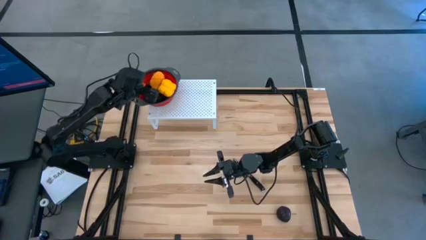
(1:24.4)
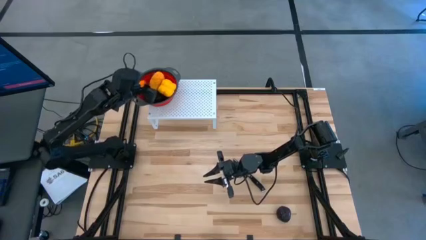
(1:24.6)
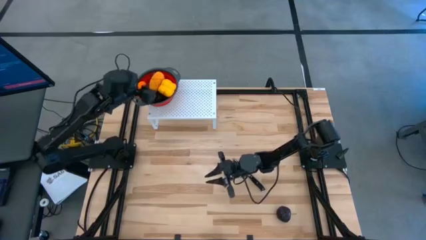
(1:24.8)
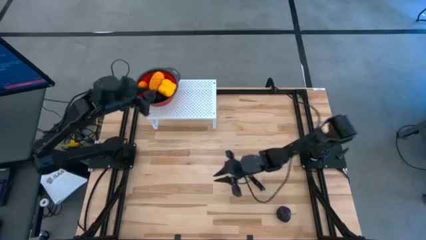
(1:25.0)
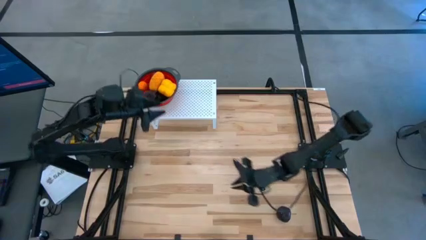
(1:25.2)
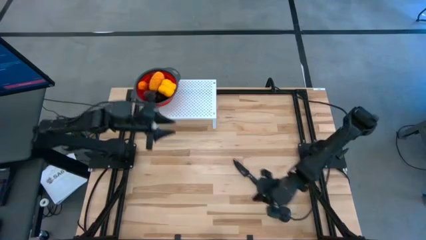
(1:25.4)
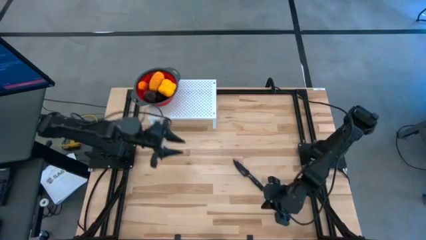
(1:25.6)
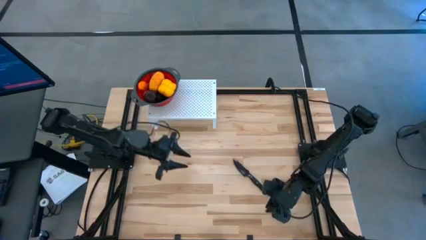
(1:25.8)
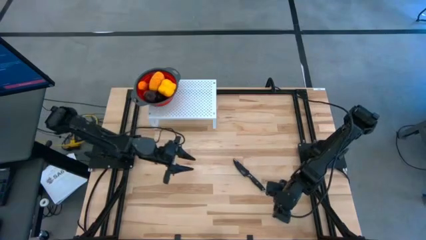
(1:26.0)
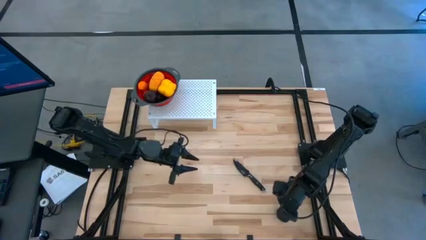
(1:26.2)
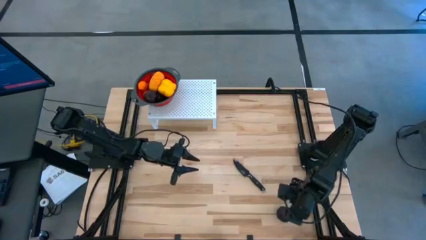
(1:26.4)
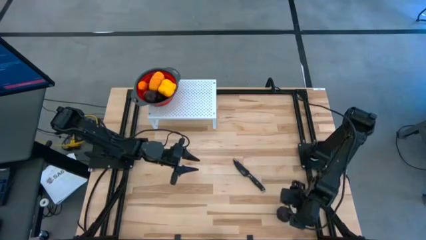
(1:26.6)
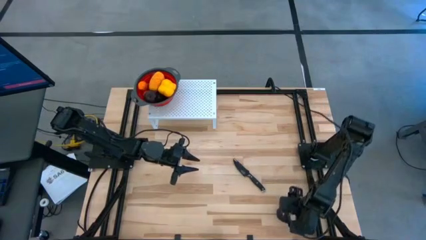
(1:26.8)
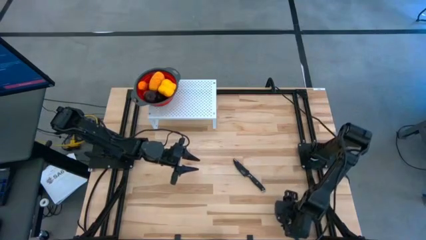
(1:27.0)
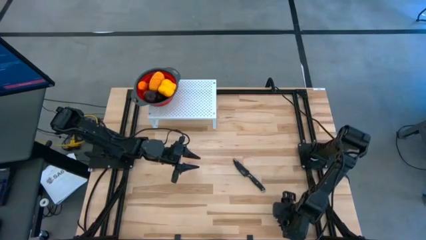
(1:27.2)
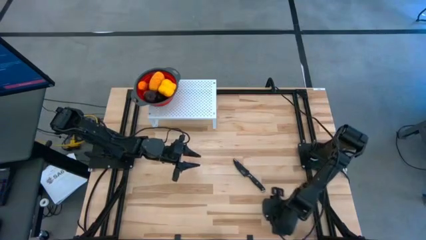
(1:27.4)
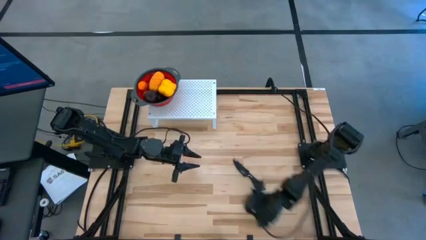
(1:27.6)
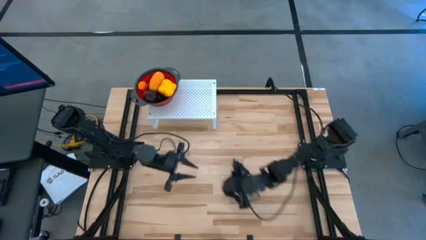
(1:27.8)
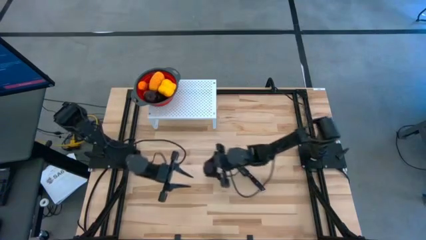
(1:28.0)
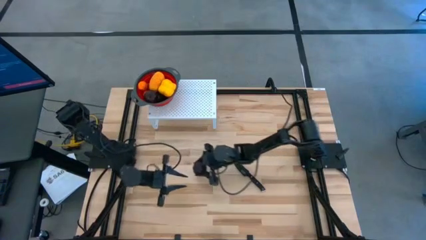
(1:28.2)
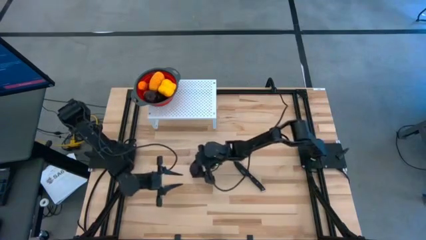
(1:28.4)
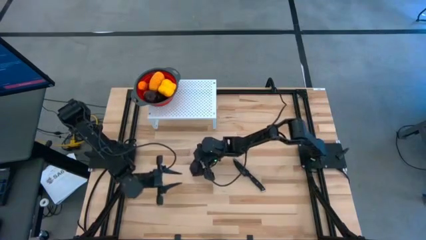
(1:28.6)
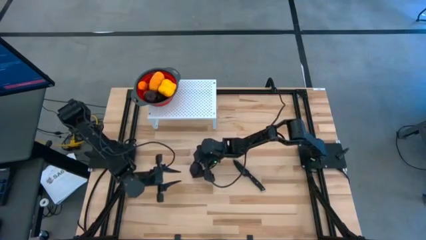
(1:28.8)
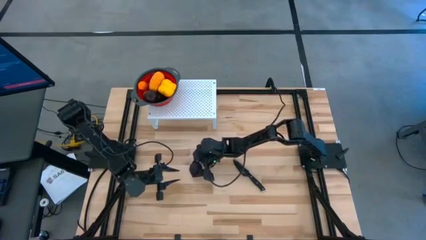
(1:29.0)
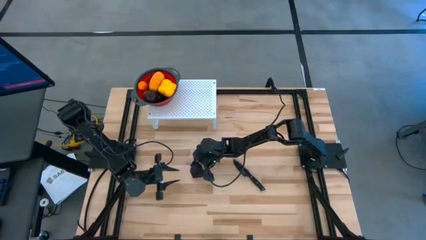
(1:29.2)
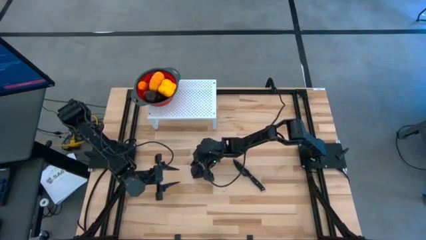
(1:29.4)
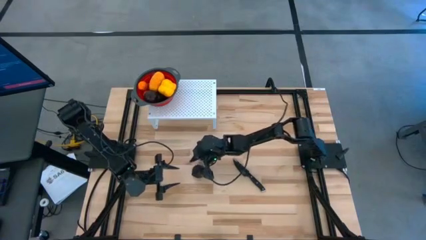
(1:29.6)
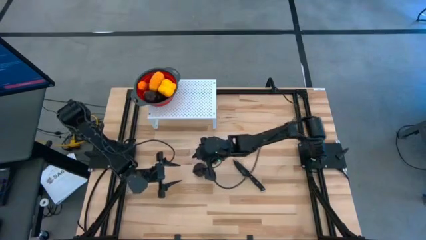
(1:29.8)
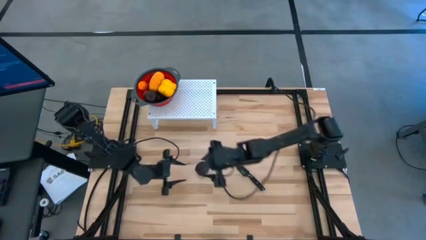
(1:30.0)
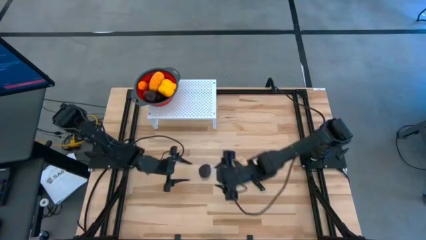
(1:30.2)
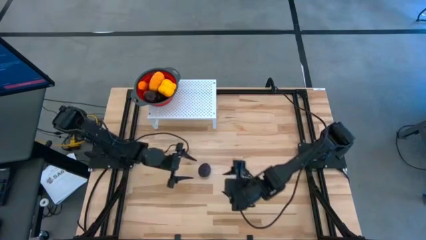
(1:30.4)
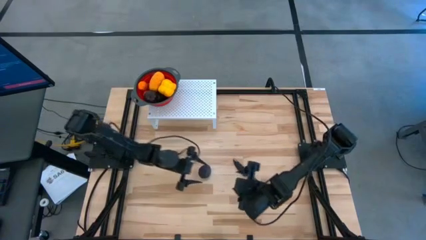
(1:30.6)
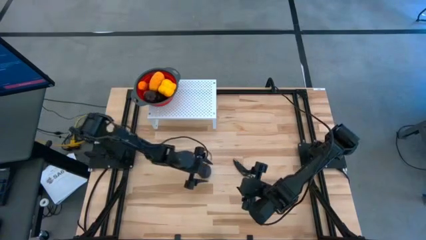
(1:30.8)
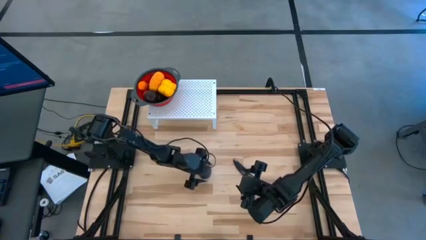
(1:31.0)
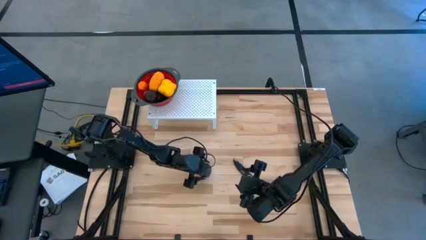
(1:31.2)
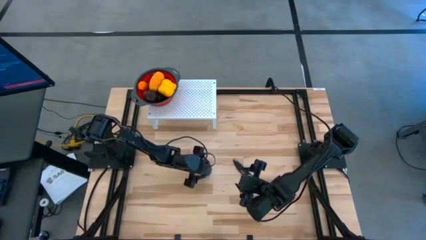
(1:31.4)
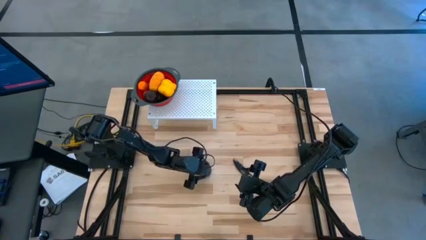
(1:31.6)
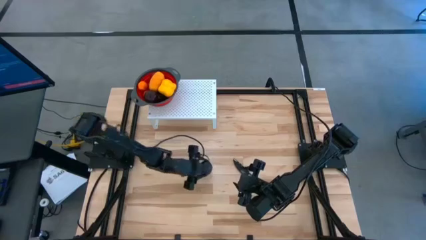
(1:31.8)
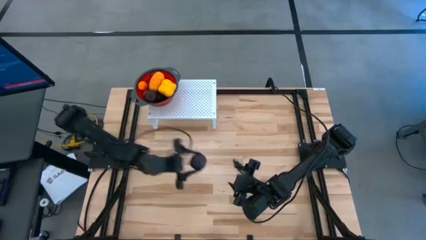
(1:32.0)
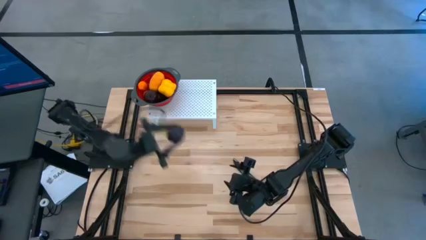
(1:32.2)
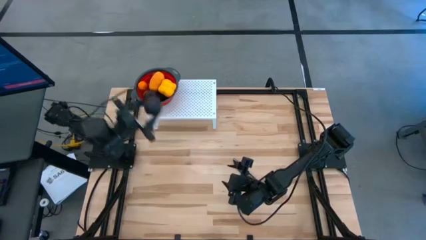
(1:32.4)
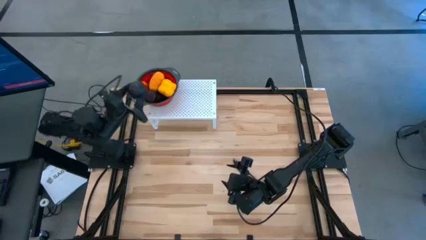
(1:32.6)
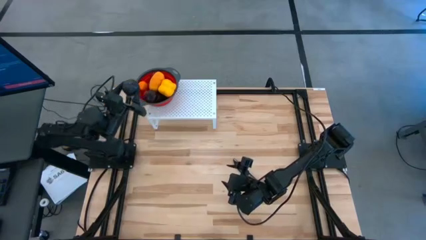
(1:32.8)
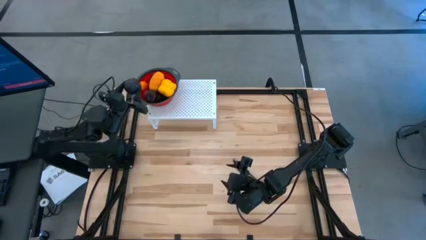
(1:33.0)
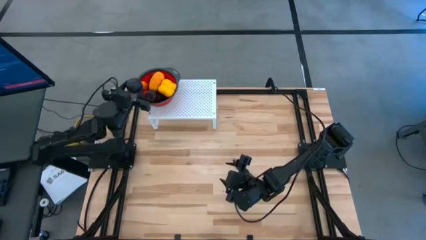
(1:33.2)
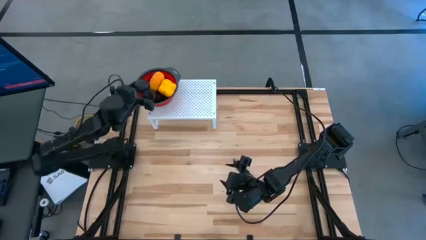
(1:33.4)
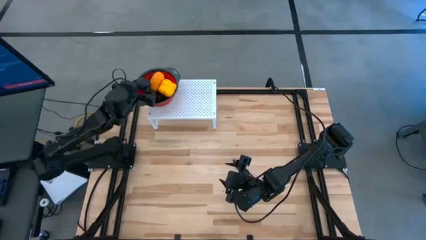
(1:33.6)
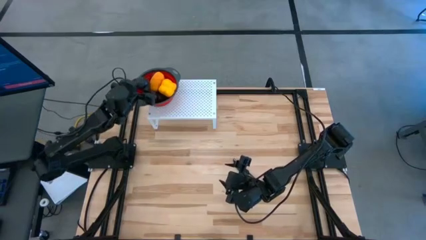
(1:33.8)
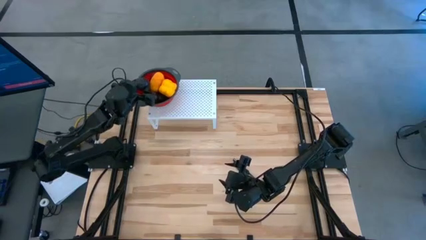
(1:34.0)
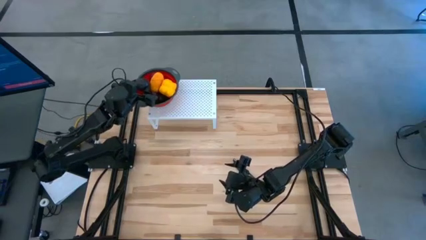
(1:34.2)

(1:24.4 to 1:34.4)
Task: Pick & Place Fruit
Put the purple plum into the red strainer bowl on the shelf

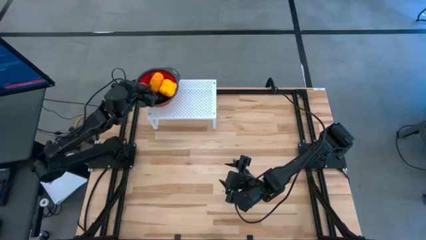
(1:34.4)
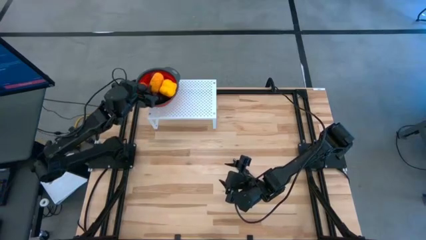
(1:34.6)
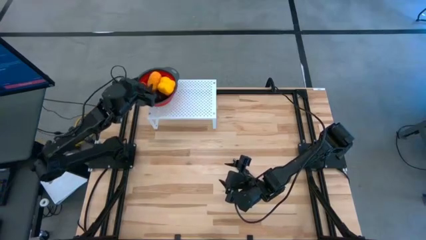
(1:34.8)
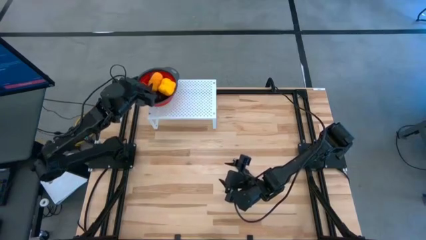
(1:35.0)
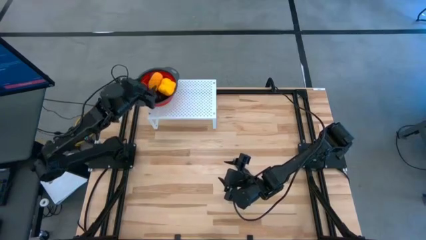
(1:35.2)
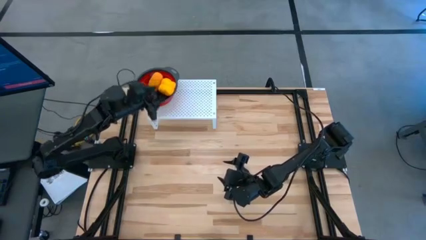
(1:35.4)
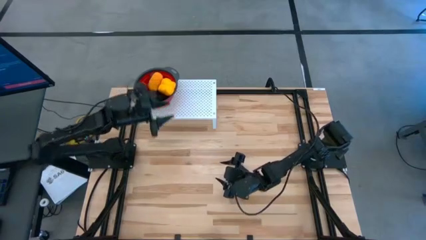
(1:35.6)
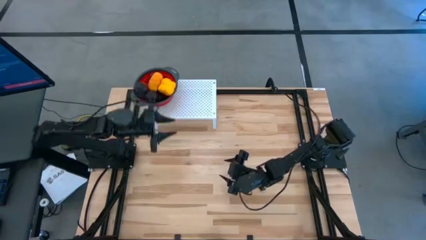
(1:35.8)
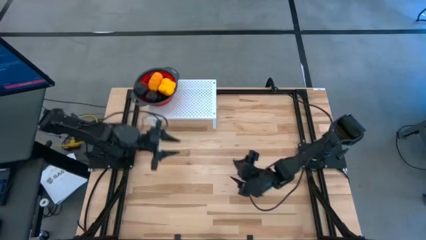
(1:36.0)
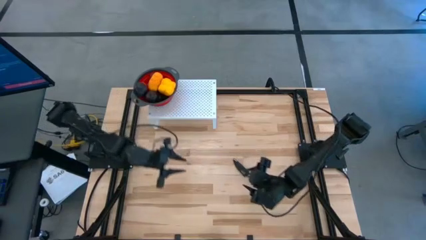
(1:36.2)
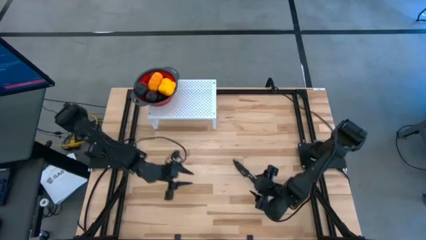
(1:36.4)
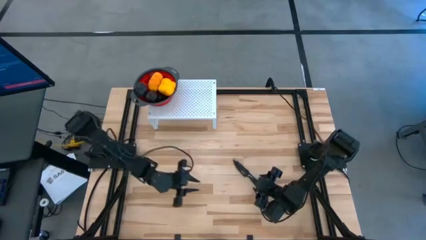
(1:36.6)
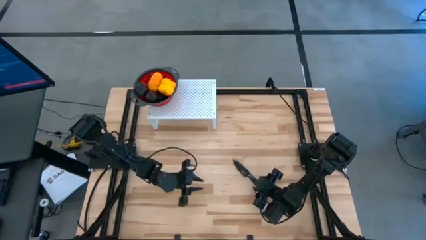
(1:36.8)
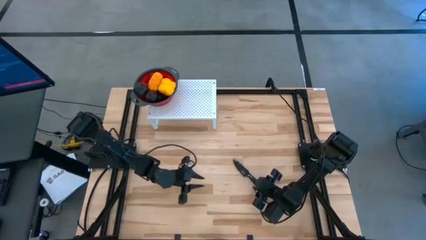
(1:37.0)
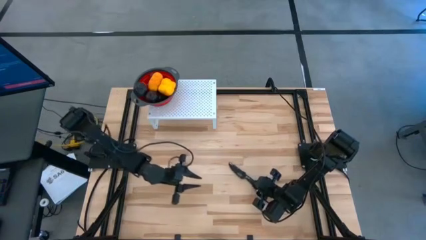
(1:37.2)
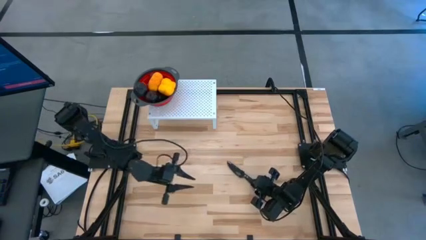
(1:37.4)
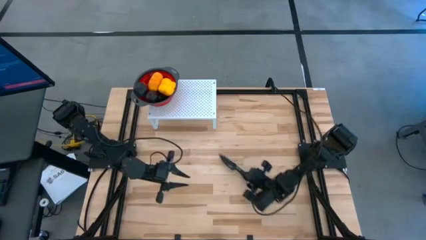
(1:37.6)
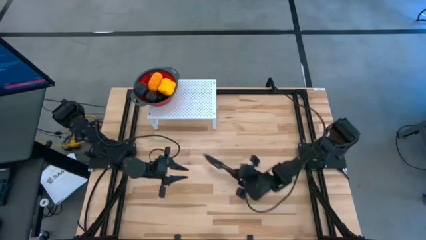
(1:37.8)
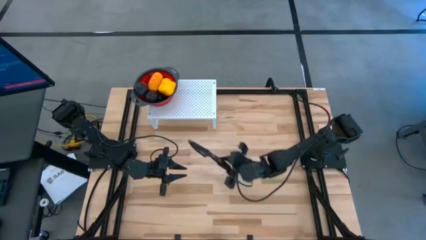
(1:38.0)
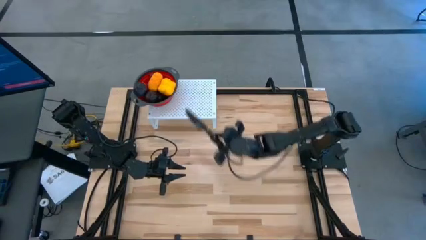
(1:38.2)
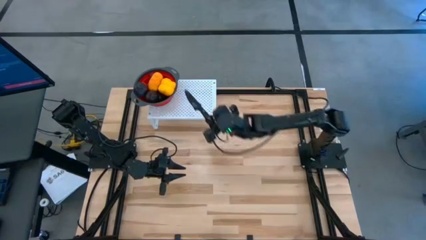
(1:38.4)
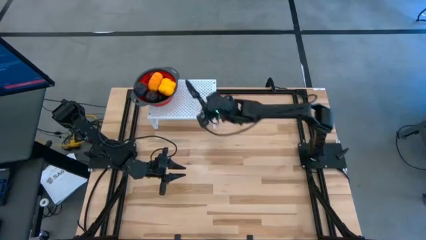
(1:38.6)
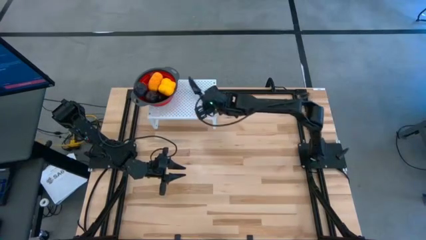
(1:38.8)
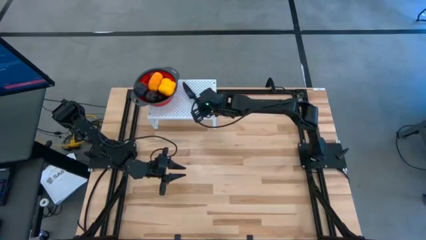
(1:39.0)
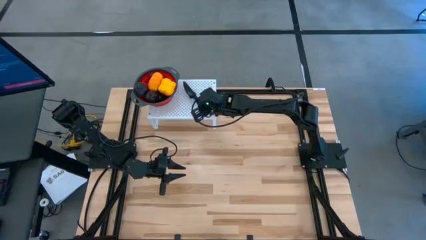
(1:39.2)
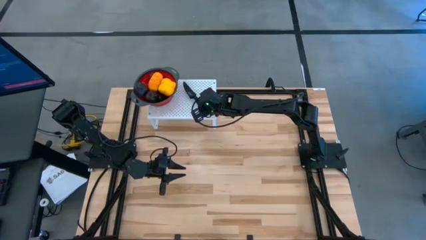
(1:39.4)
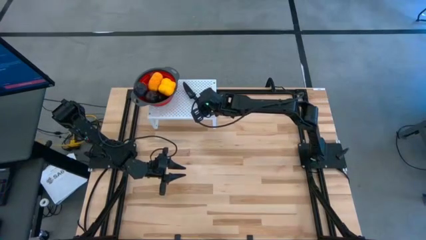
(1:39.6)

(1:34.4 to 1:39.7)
Put the black knife on the shelf

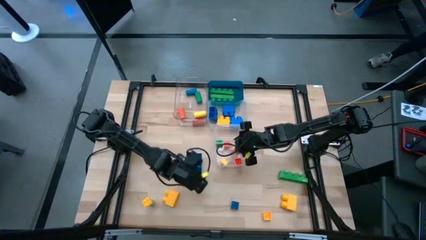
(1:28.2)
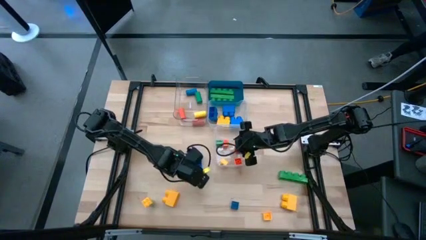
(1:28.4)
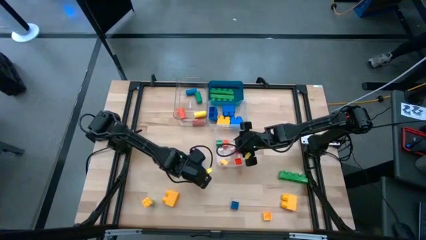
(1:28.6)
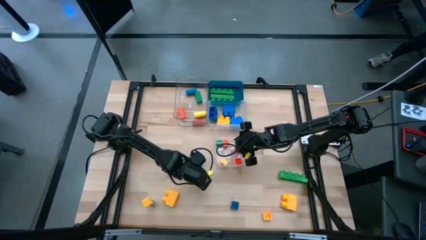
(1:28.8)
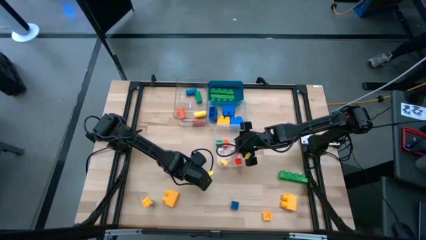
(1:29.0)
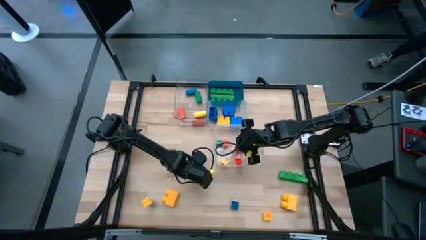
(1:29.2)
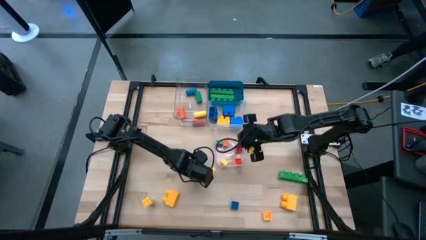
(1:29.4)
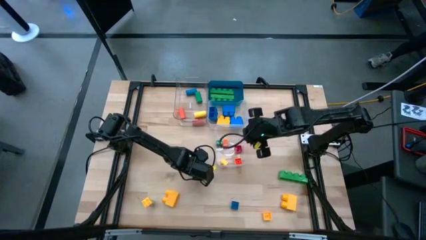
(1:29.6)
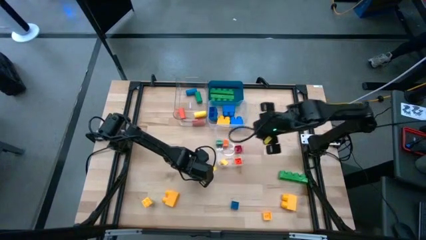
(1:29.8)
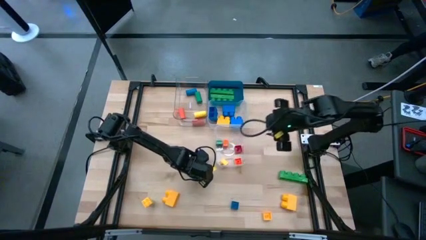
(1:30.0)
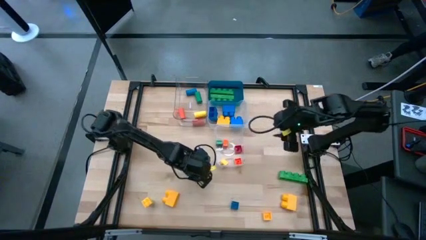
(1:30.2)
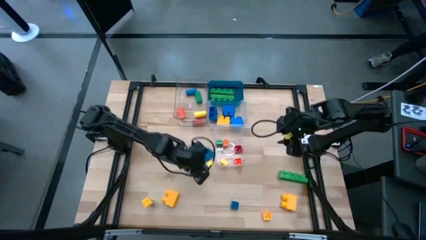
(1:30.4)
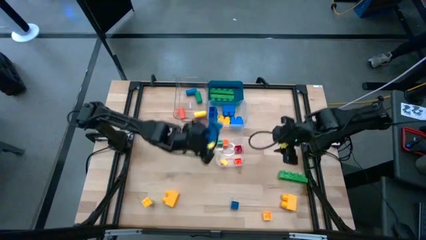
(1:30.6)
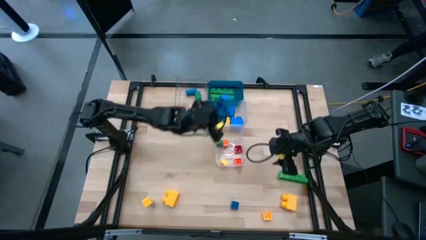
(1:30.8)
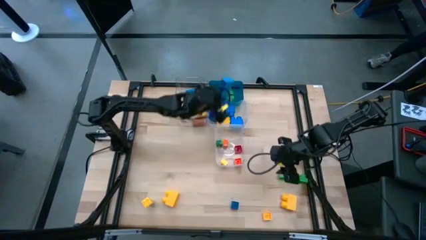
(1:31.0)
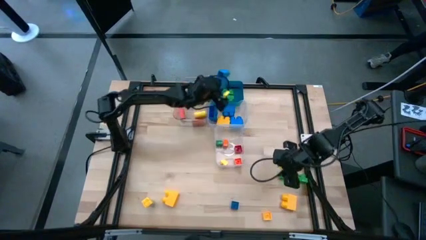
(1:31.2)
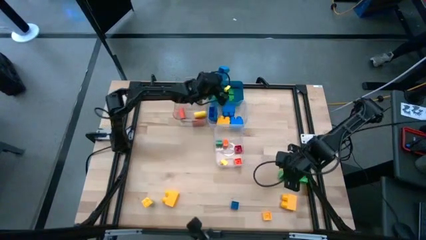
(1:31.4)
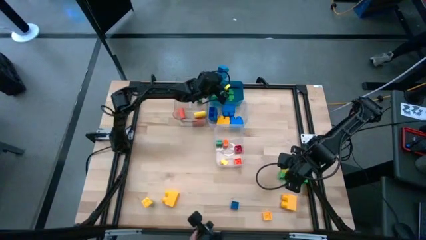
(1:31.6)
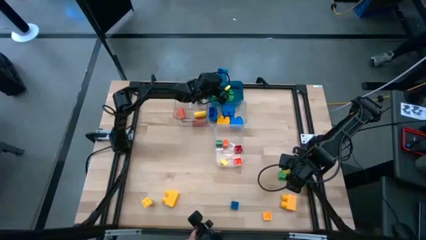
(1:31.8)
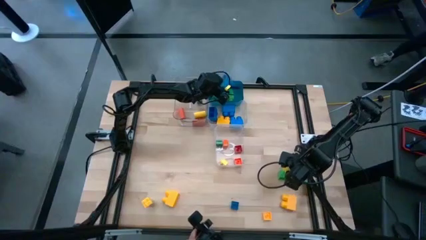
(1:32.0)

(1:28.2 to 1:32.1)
Task: Sort blocks by size
Put the blue 4 stud large game piece into the blue bin
